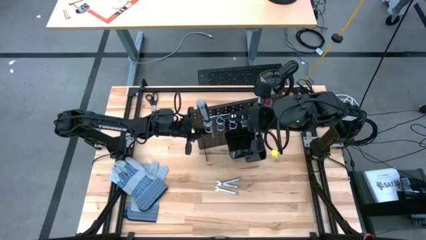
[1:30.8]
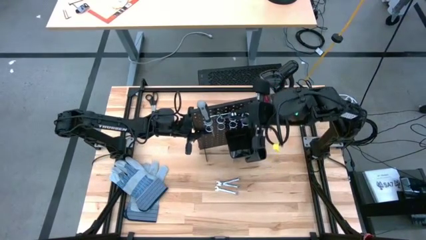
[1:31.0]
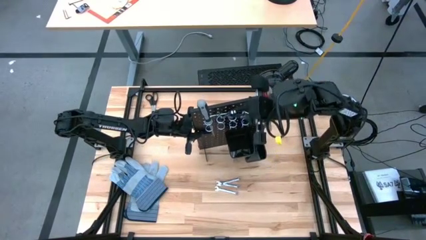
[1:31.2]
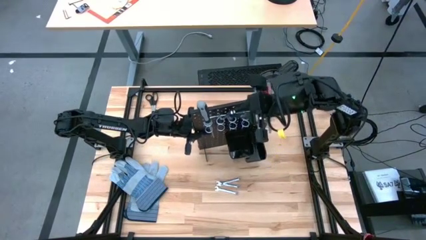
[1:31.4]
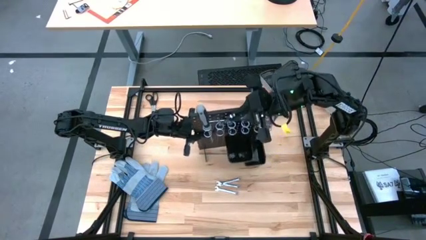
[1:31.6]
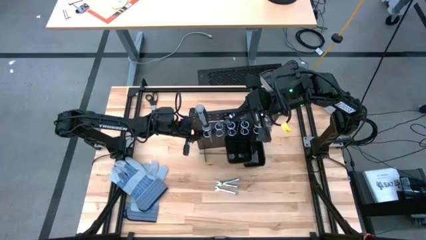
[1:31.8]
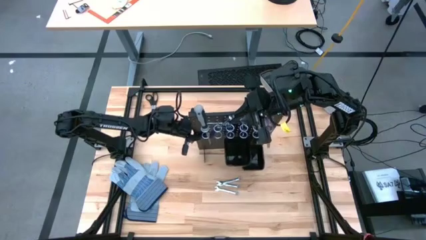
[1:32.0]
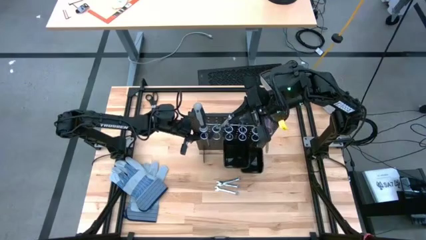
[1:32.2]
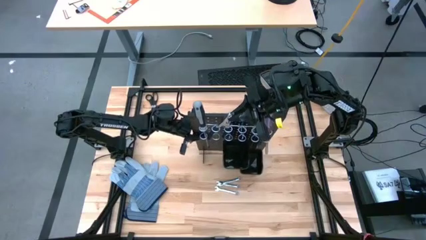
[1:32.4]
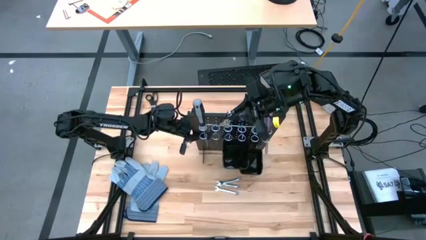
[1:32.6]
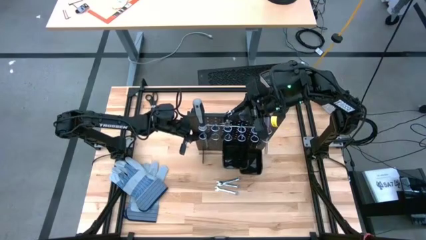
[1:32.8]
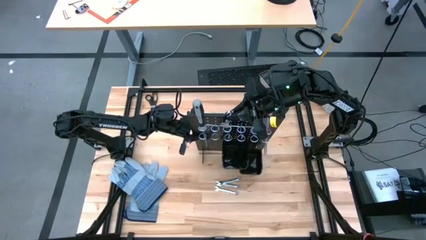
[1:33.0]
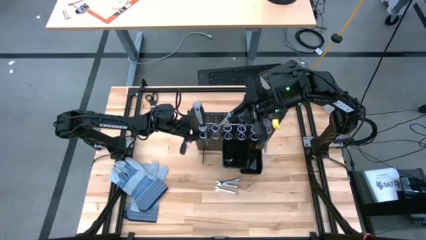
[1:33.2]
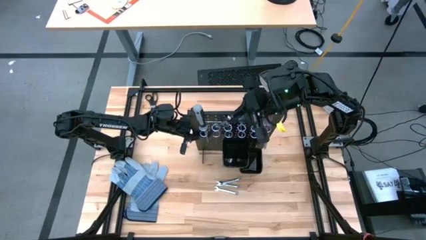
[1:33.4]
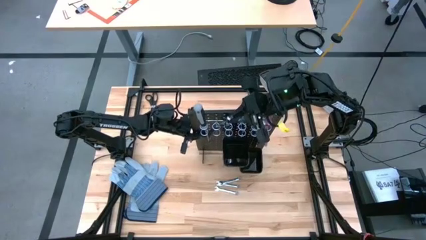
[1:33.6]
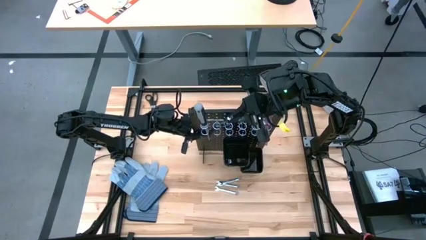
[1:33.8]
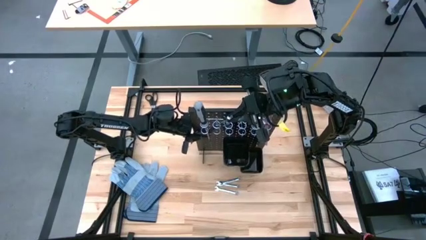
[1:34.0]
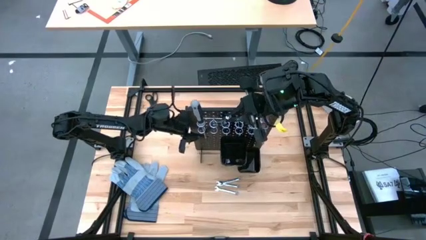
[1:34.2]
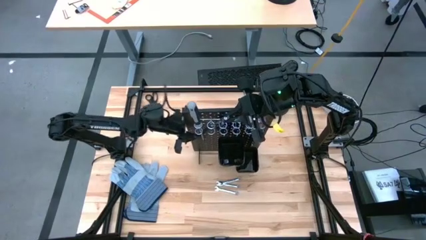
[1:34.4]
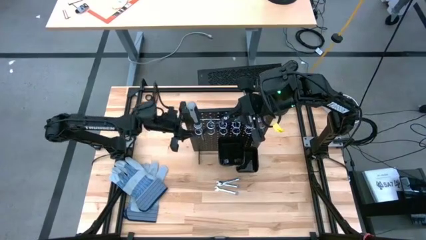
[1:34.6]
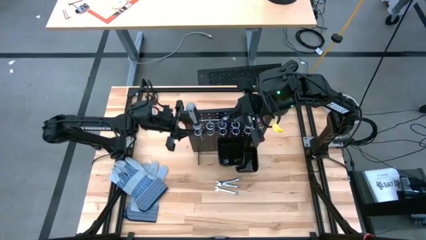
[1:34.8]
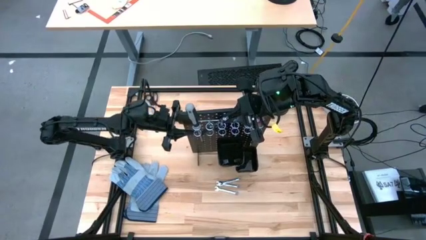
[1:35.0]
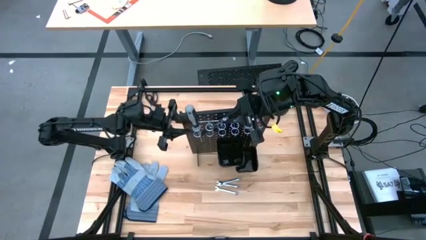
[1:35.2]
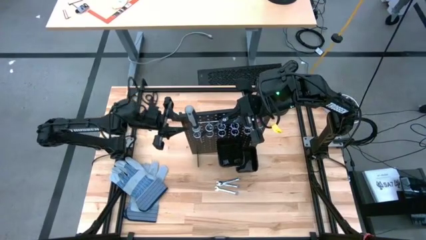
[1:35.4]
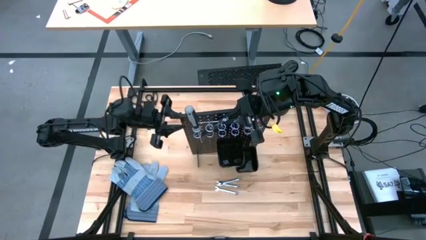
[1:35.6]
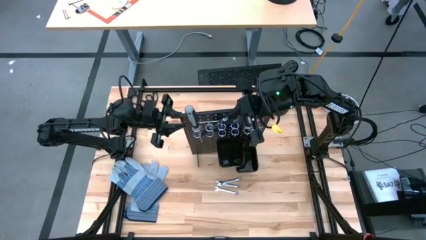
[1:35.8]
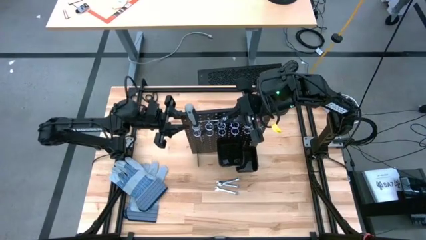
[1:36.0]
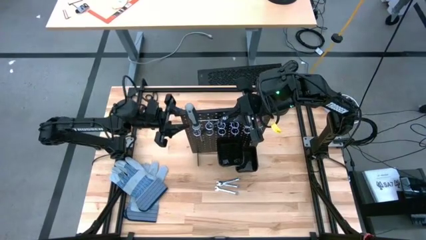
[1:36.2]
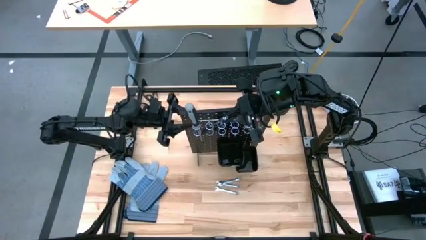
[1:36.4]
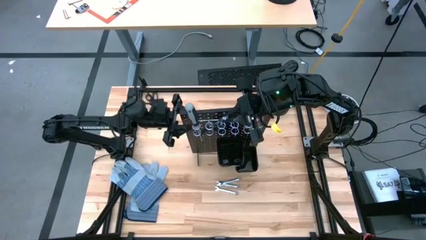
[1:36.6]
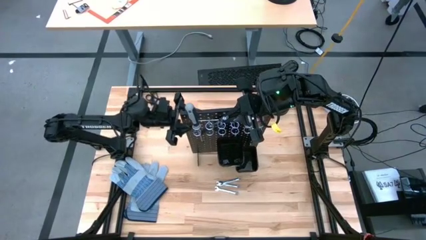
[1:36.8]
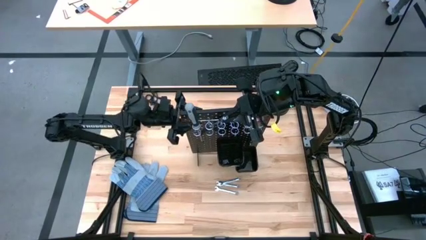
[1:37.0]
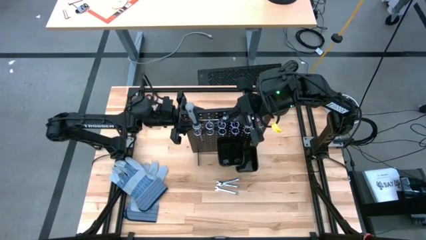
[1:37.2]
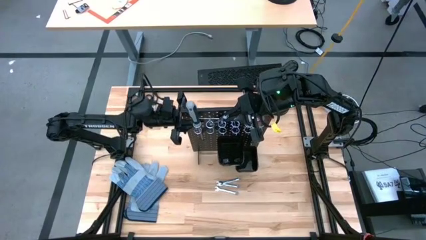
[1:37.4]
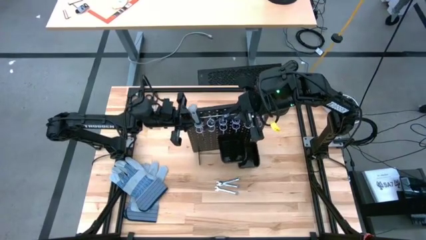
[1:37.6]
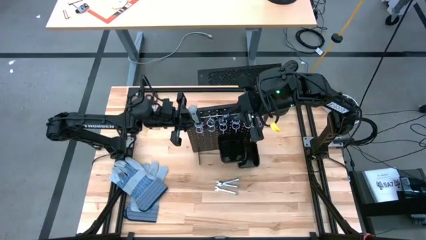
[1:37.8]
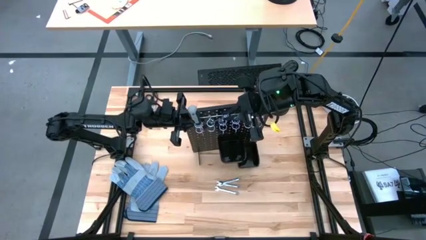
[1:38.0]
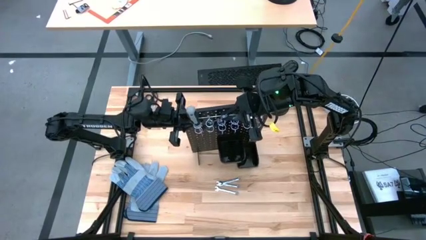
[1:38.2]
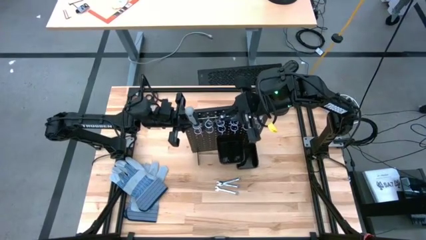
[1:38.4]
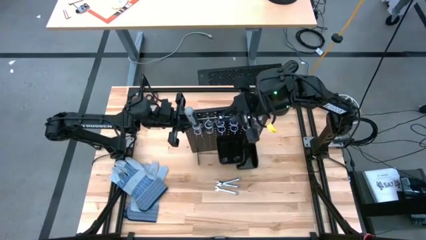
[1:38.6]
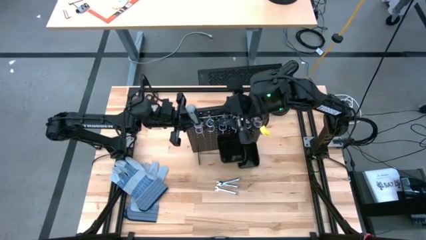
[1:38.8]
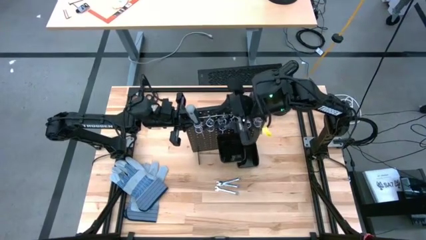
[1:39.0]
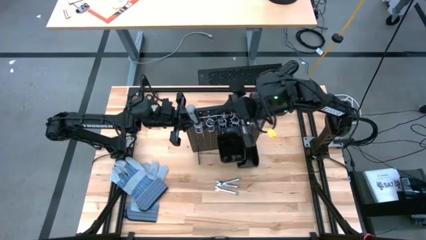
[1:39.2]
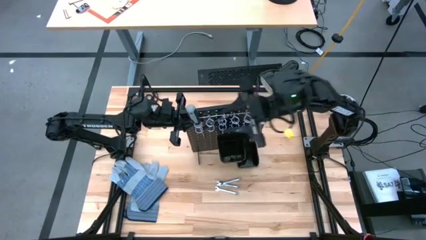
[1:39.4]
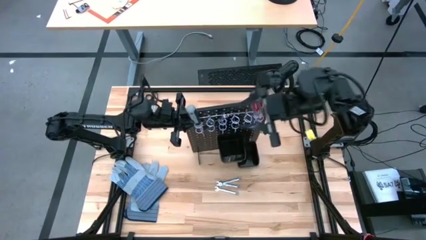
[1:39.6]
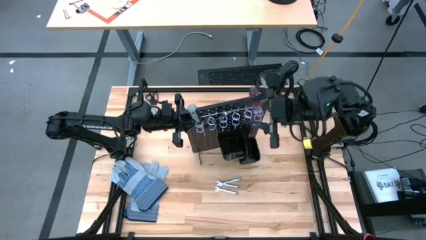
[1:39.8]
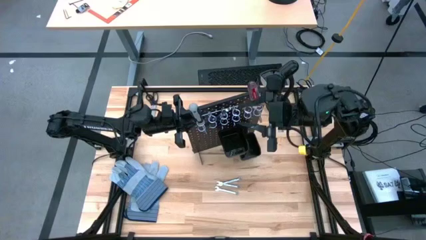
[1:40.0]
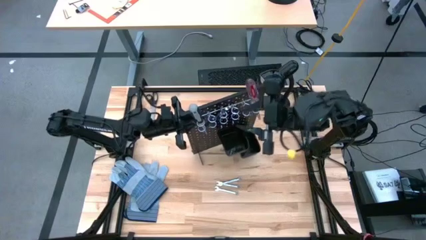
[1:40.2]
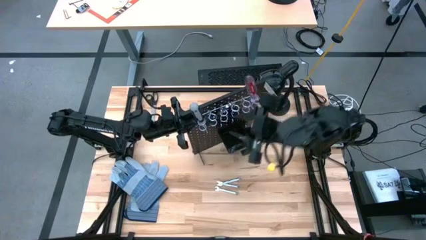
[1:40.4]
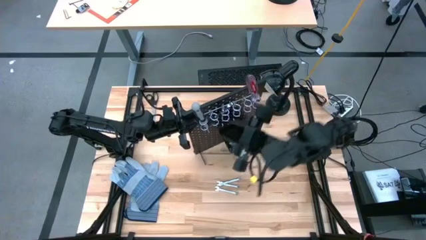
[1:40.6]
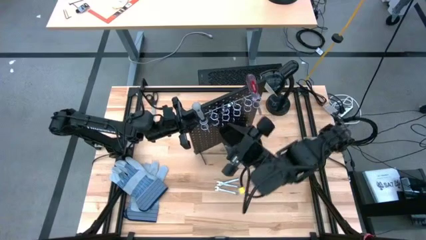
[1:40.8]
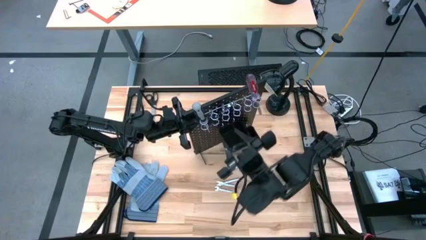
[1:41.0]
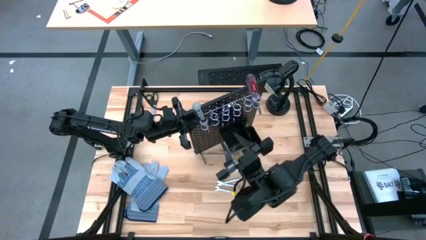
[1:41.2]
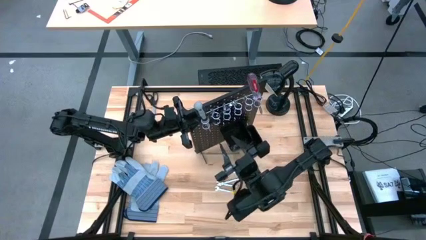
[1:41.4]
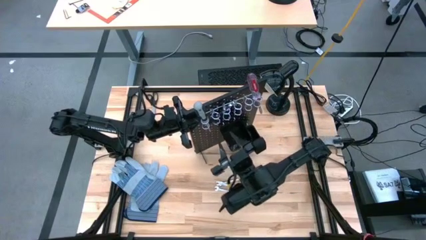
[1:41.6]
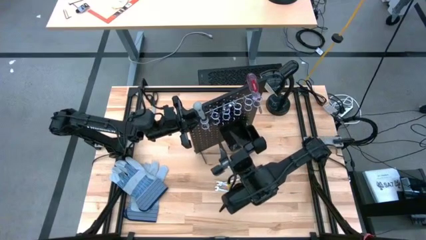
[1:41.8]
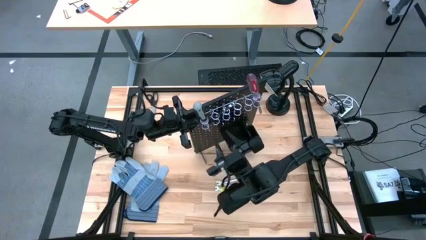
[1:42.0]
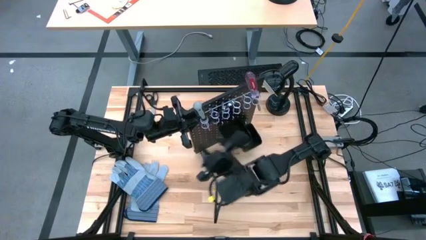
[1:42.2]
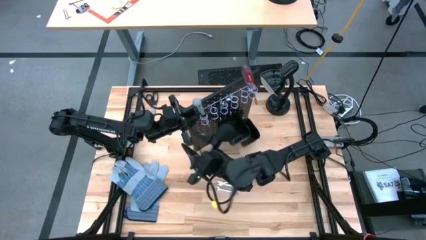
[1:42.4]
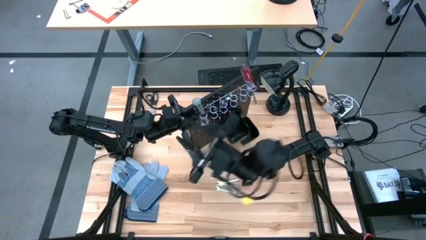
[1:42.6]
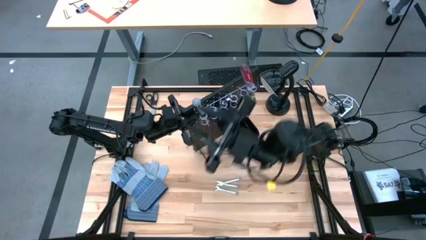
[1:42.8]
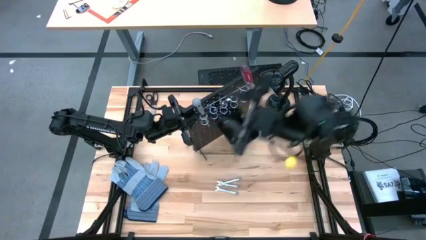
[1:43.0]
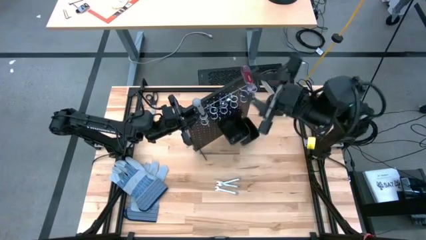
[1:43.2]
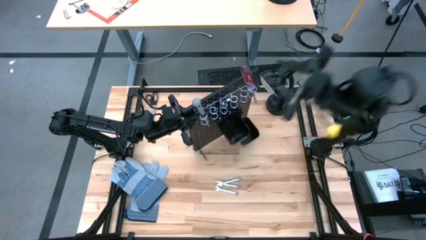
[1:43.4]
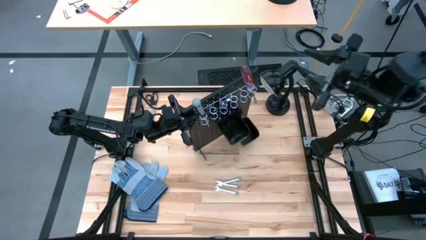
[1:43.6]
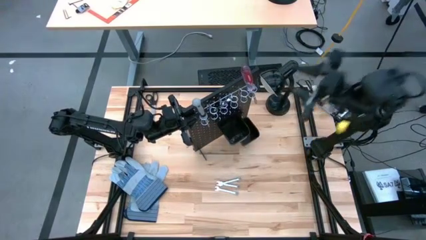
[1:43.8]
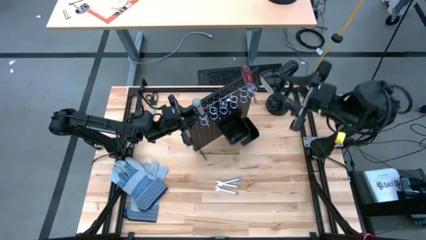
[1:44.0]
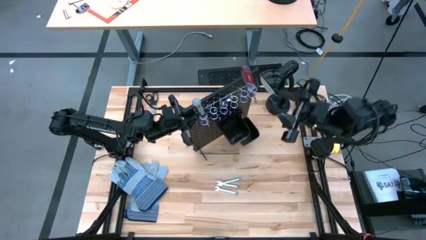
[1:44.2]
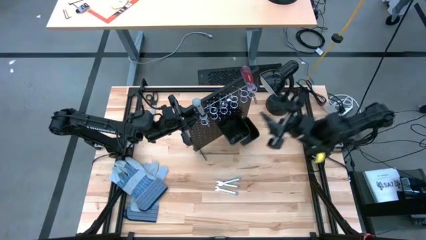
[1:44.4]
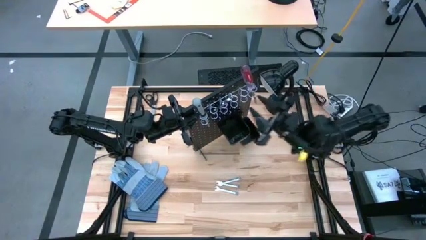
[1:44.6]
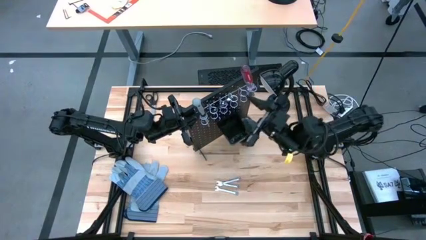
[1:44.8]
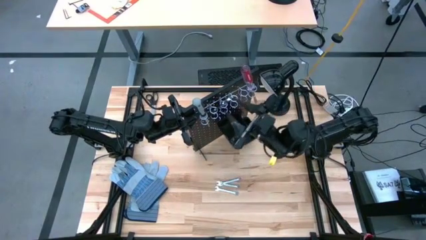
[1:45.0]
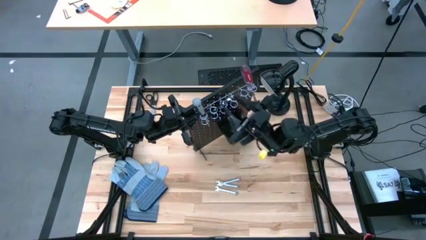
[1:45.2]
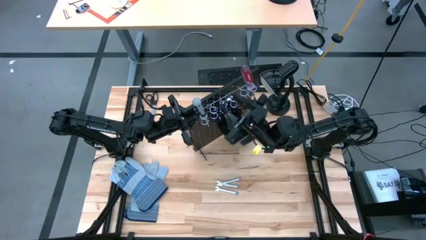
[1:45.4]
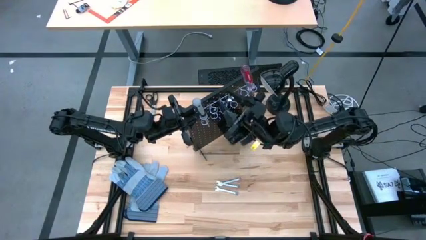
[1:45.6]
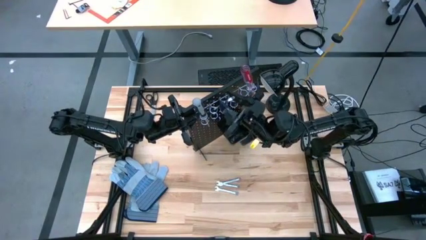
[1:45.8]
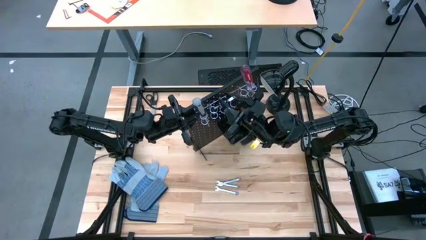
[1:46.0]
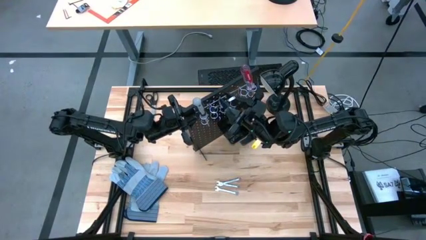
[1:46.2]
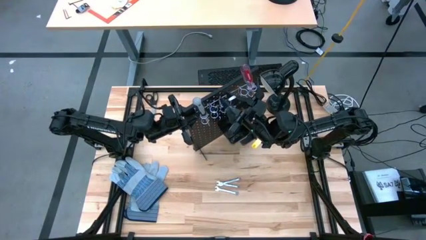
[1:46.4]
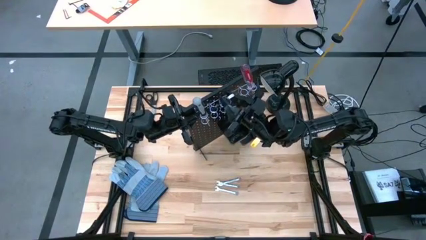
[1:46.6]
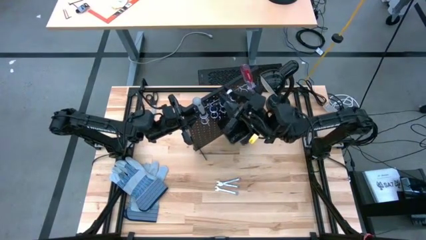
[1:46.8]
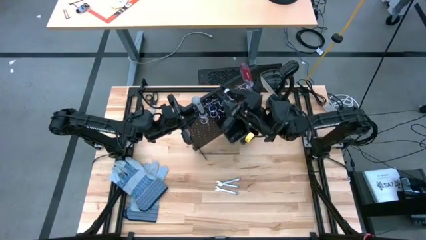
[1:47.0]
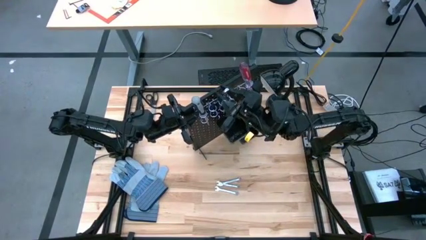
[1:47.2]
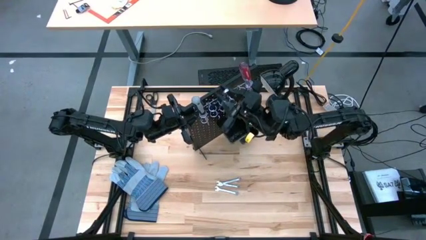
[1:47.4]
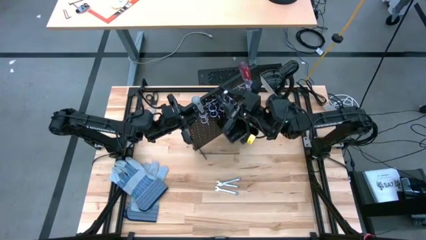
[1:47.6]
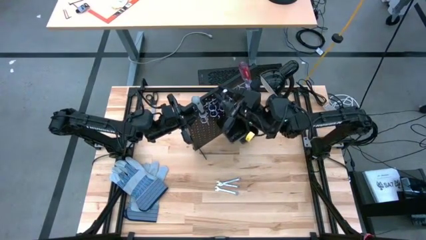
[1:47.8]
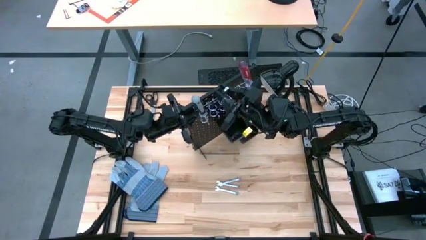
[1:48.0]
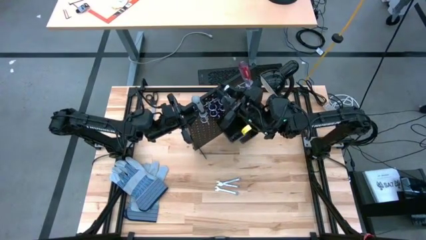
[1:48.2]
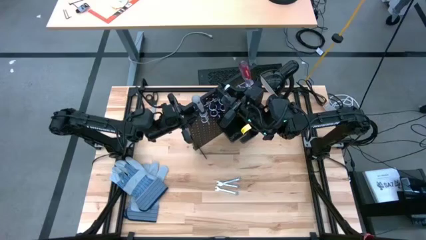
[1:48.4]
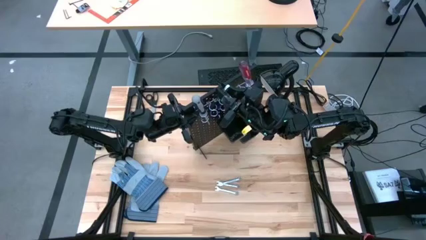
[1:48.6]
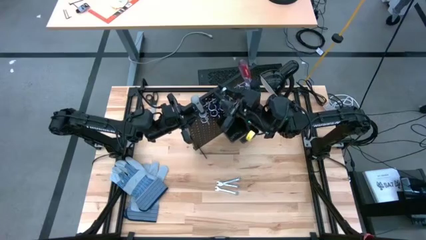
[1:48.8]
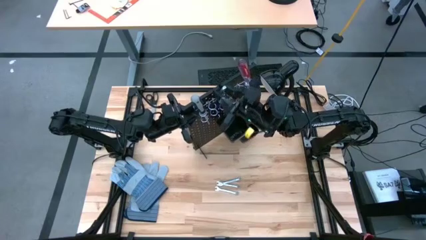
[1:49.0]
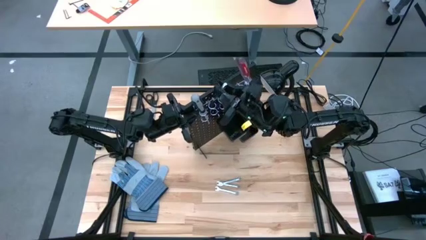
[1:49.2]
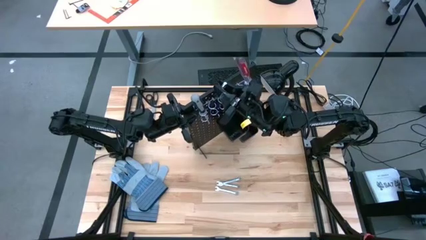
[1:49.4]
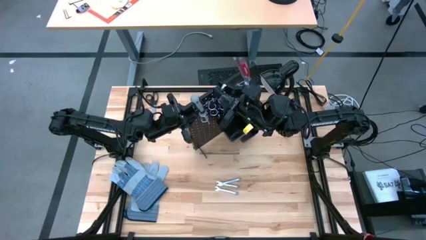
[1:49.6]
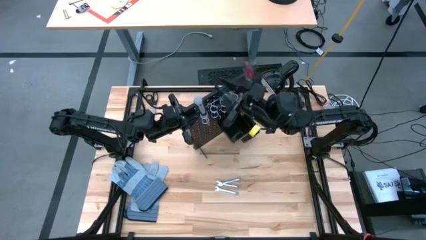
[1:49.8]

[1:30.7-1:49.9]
Task: Hang tools onto peg board
Unhang the black pliers from the black peg board
